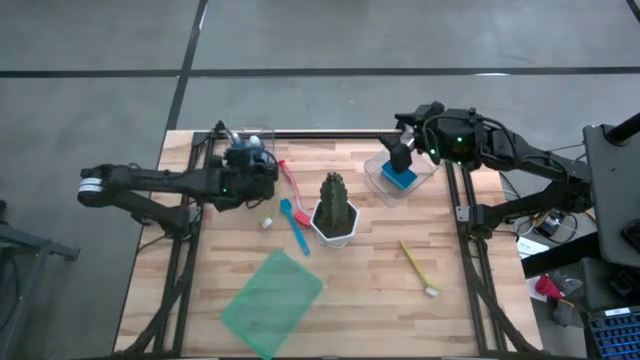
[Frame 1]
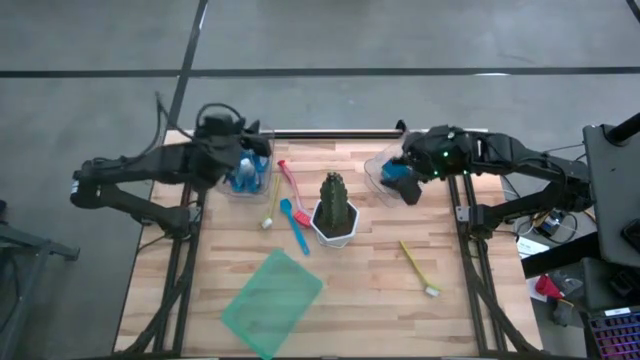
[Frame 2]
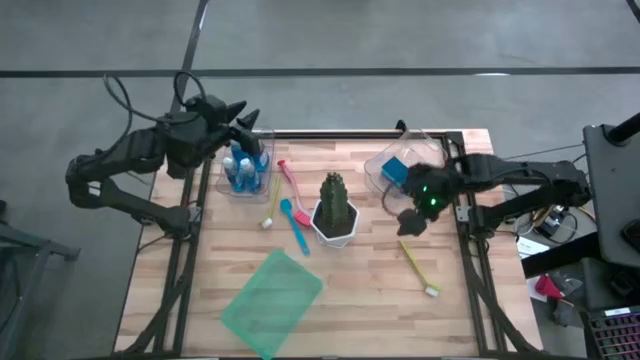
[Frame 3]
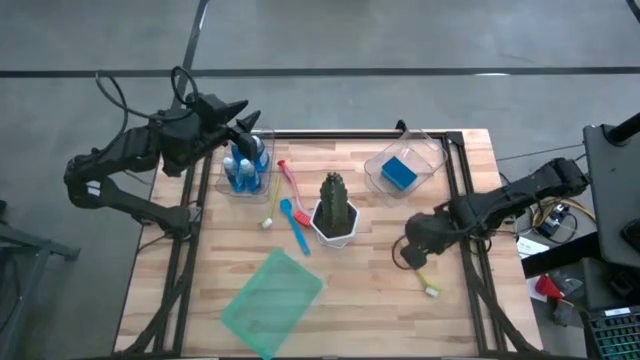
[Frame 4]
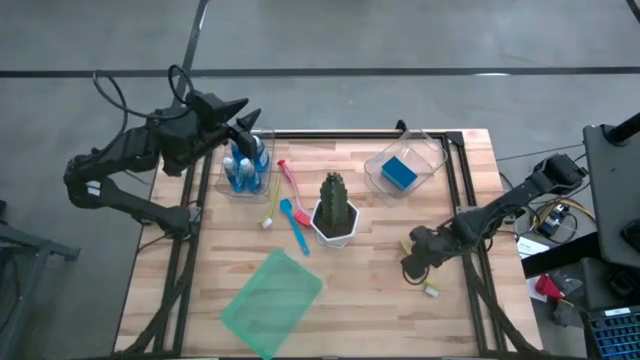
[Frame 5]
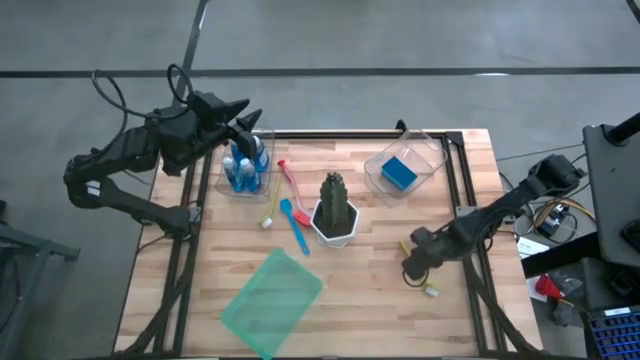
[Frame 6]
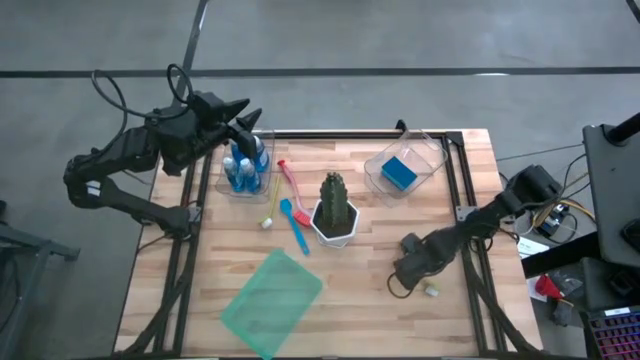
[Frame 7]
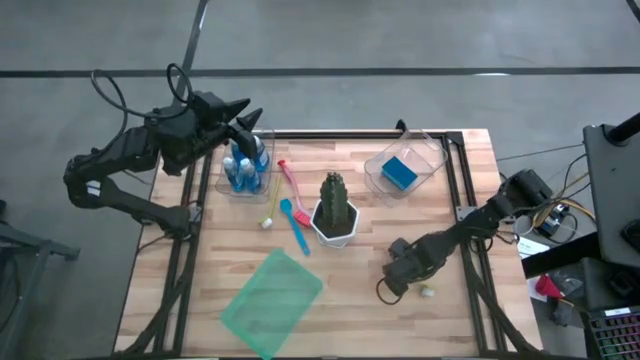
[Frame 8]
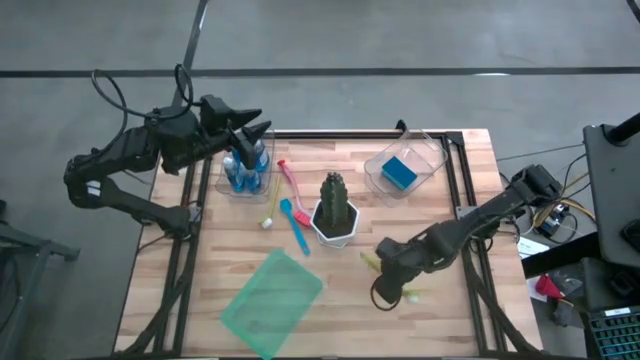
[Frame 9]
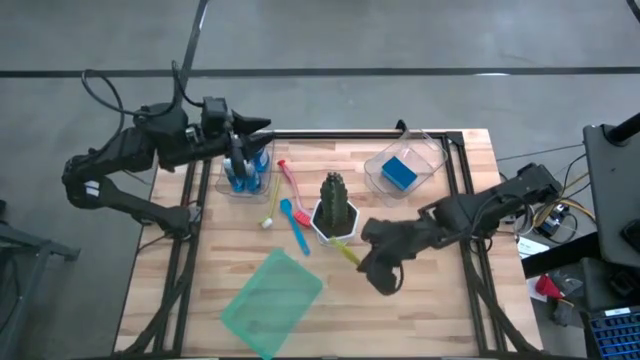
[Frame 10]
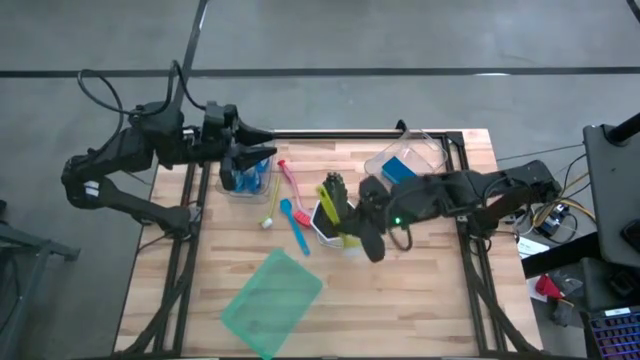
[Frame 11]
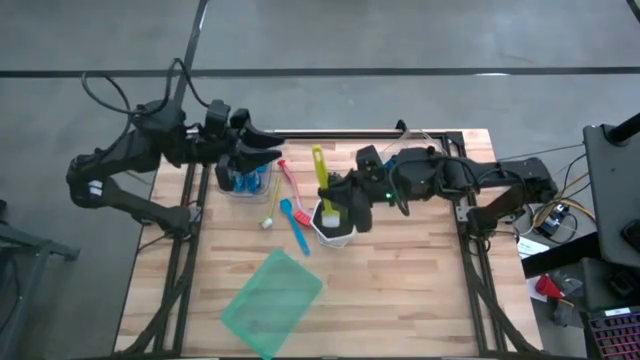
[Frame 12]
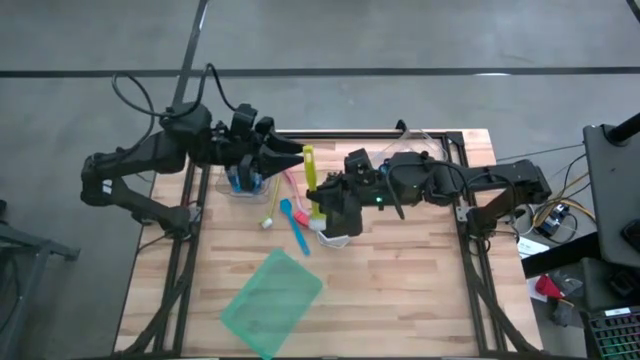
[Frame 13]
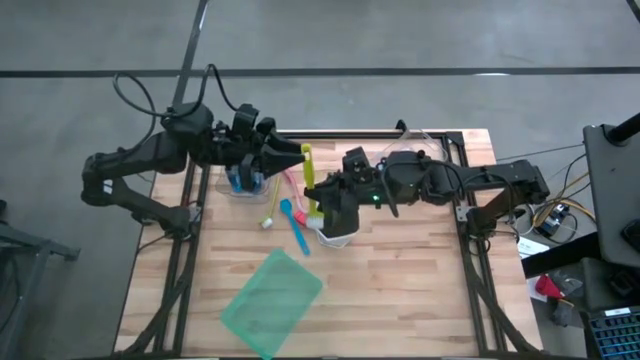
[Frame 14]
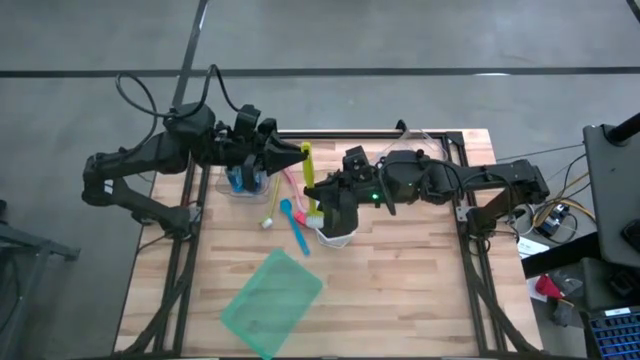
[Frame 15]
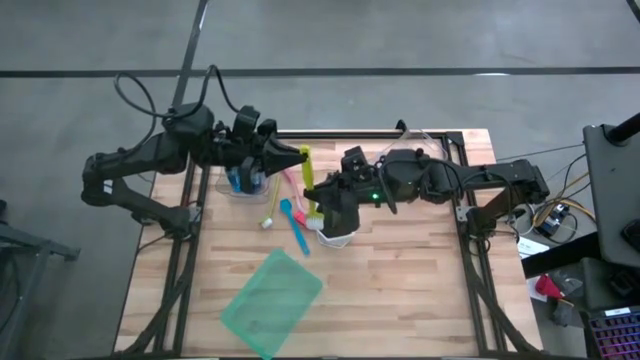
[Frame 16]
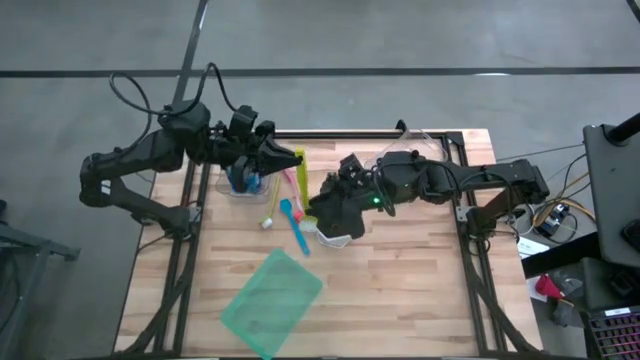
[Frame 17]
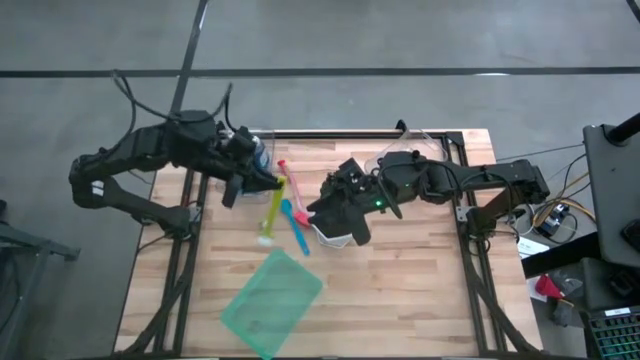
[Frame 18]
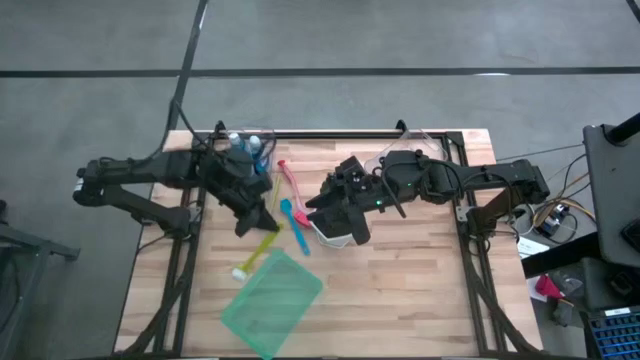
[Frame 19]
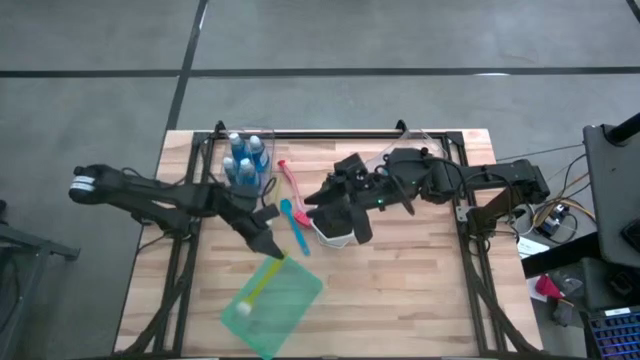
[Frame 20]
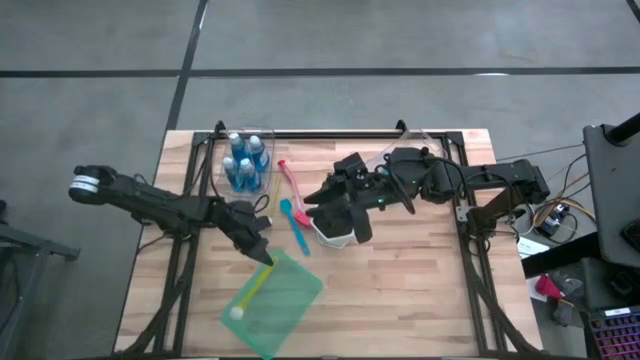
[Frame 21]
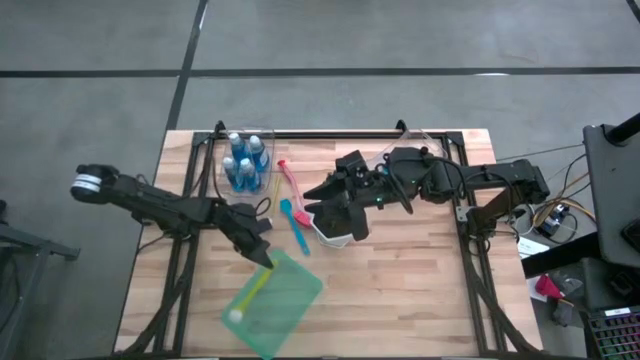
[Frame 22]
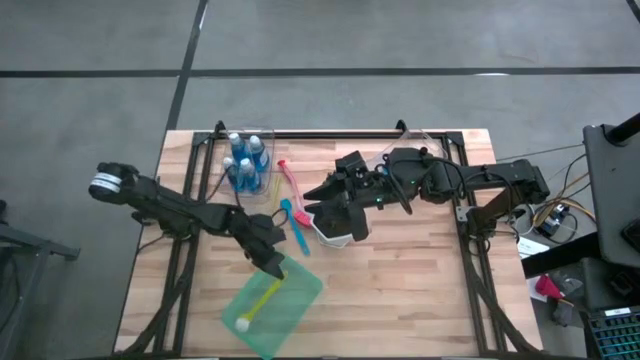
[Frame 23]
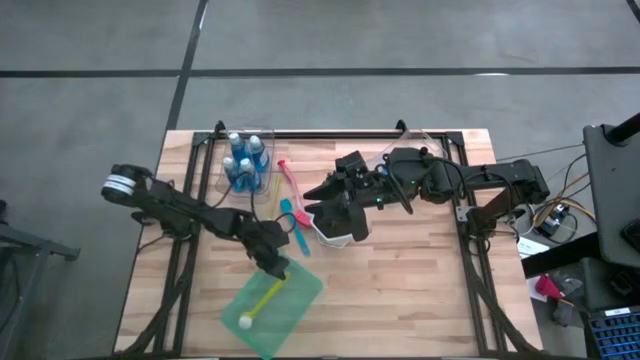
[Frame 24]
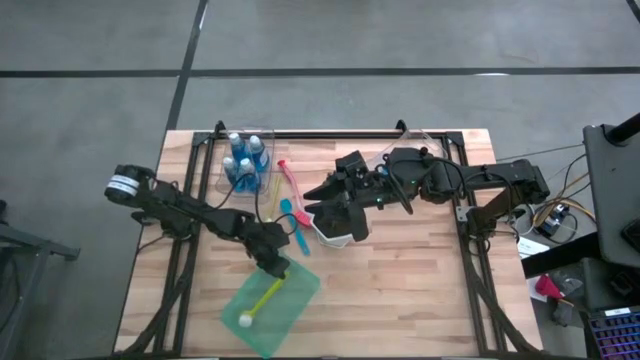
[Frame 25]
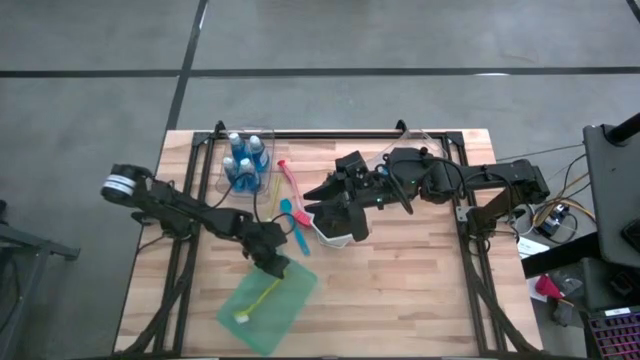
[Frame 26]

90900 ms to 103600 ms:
Task: Pick & Place Kitchen Sink Supplies
Put the green dish brush into the green bin

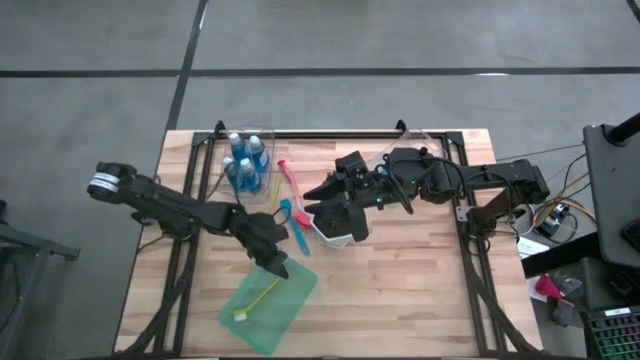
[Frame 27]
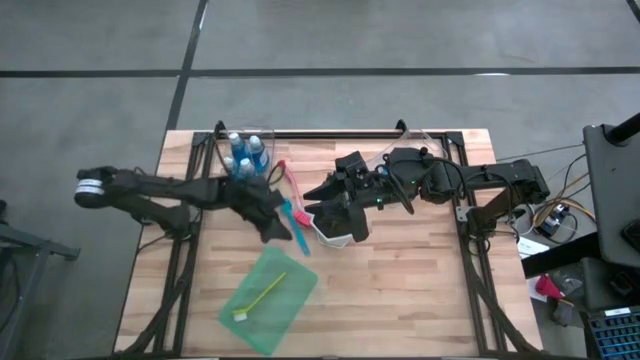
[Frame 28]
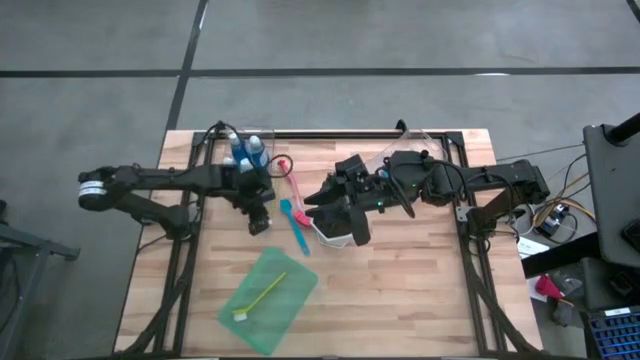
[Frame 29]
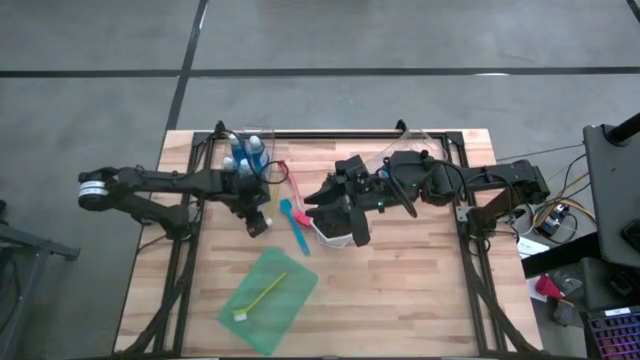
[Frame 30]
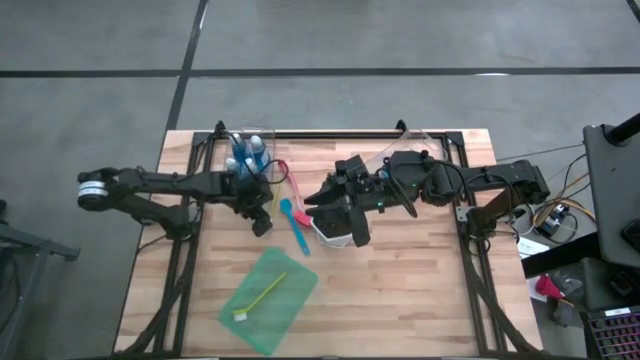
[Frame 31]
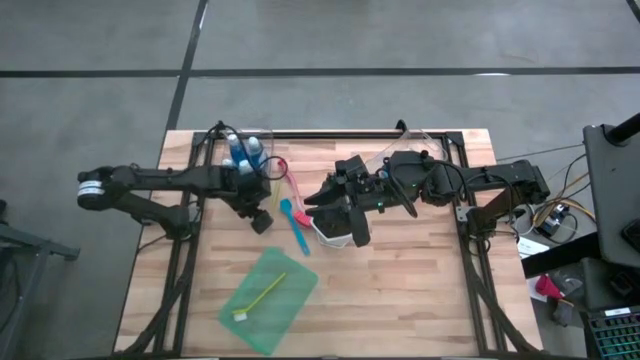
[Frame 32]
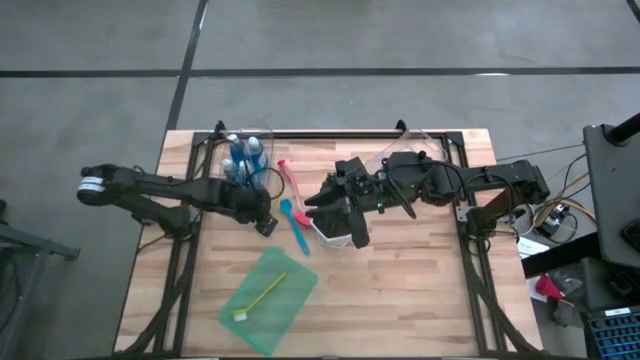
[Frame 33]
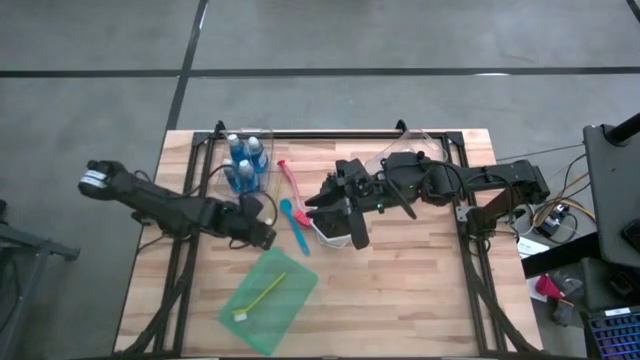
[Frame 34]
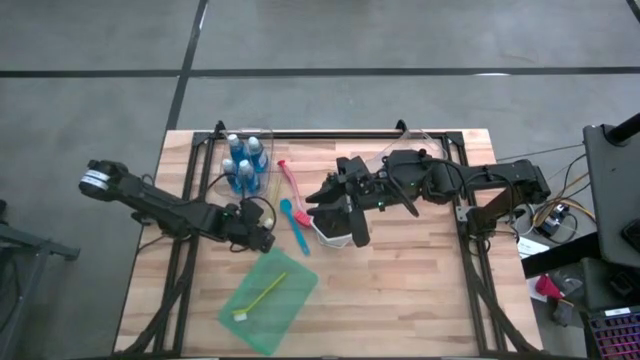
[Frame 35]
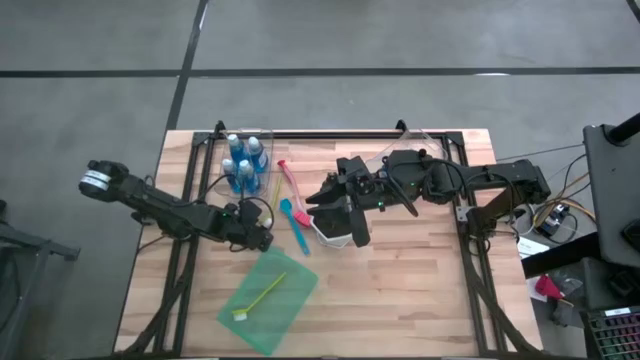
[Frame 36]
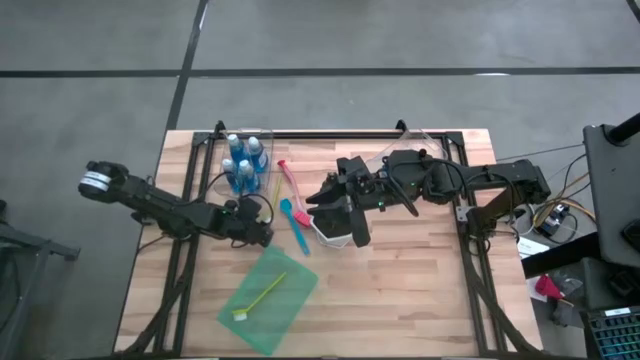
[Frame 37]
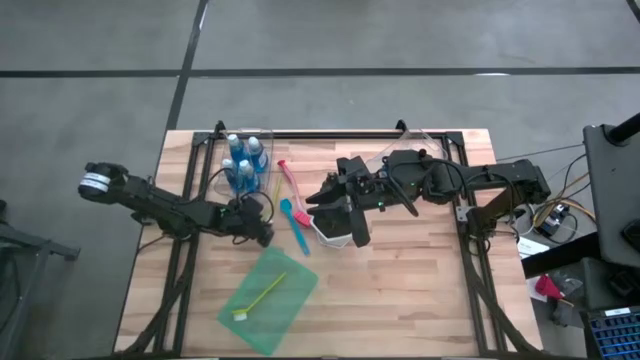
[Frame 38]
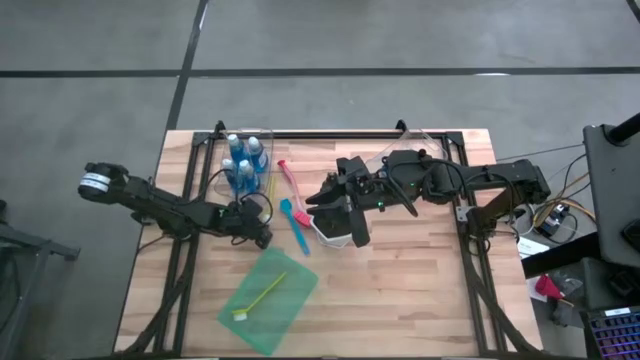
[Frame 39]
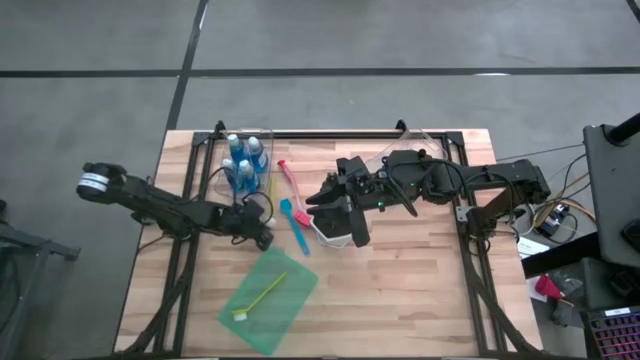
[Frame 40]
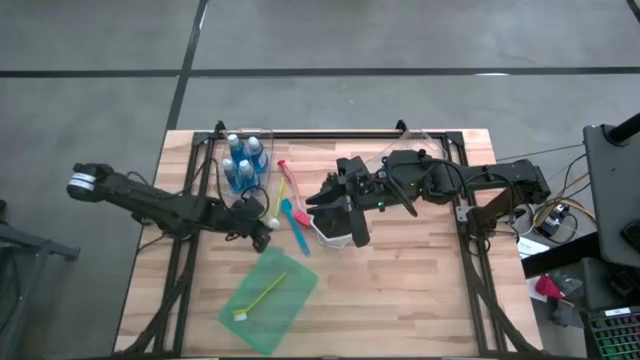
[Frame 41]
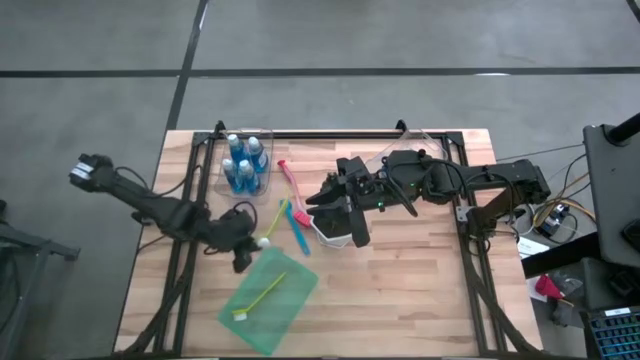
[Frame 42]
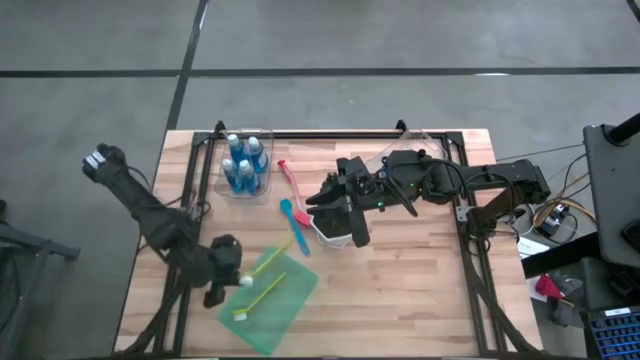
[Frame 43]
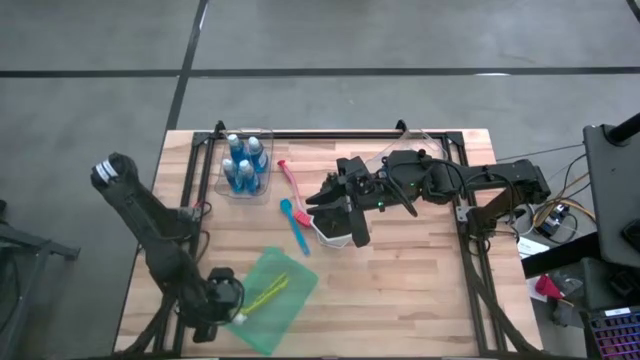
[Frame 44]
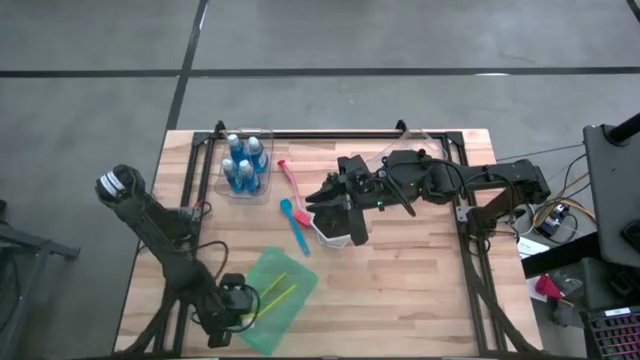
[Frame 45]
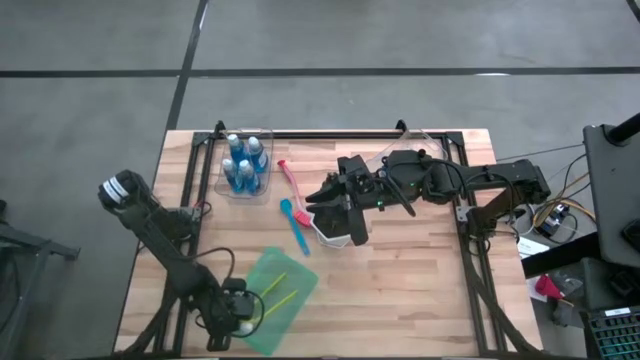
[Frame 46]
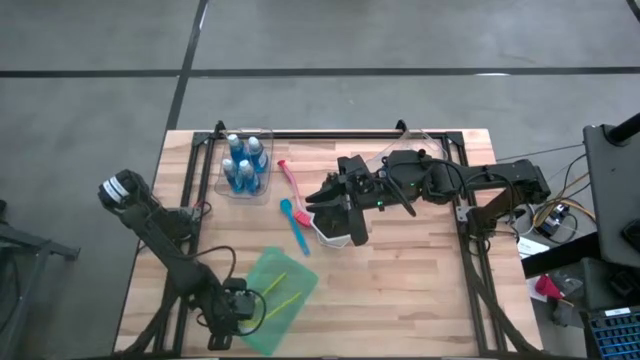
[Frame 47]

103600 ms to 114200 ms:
Put the green dish brush into the green bin
